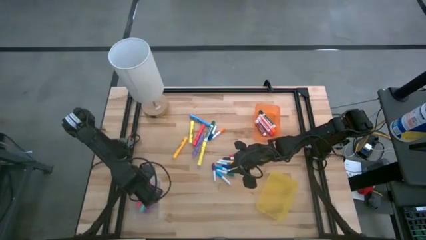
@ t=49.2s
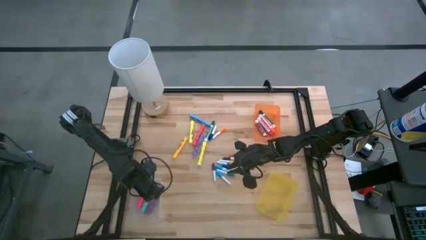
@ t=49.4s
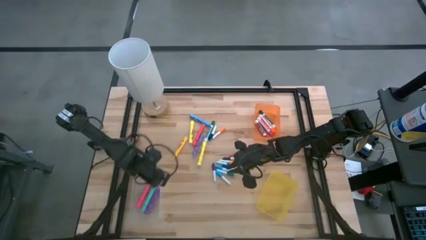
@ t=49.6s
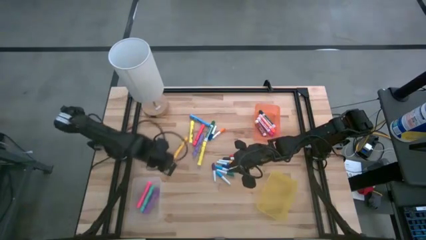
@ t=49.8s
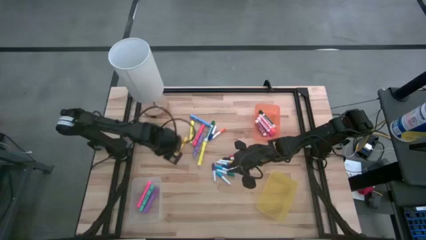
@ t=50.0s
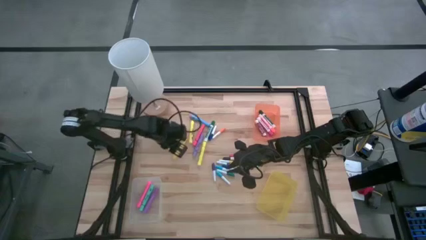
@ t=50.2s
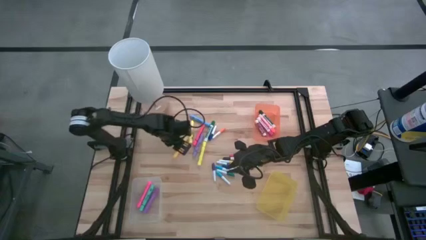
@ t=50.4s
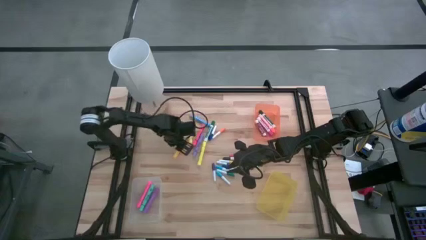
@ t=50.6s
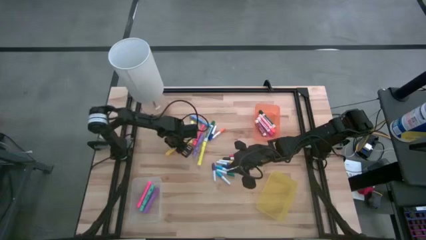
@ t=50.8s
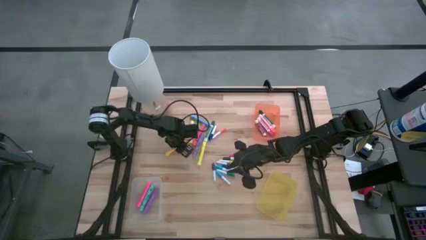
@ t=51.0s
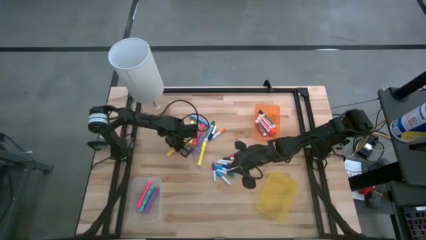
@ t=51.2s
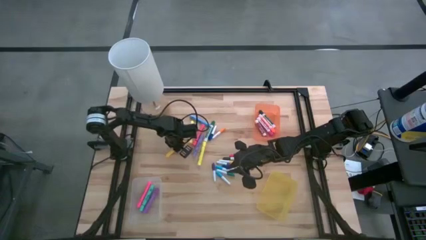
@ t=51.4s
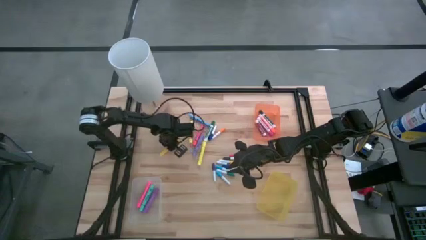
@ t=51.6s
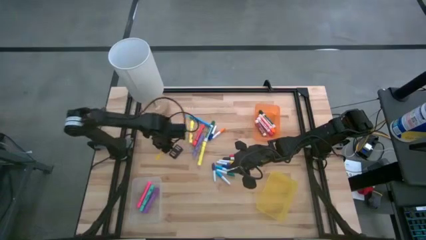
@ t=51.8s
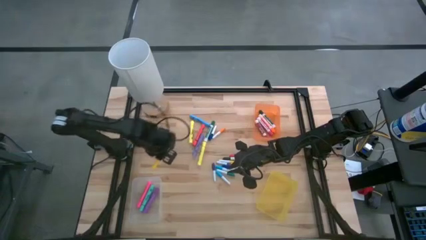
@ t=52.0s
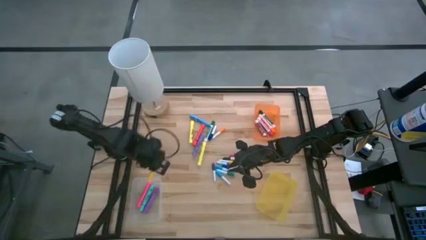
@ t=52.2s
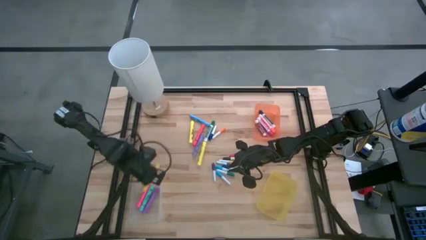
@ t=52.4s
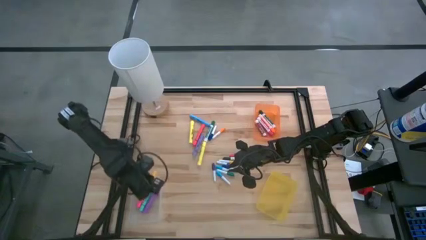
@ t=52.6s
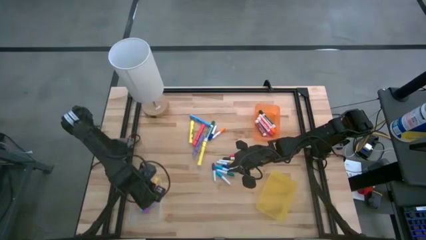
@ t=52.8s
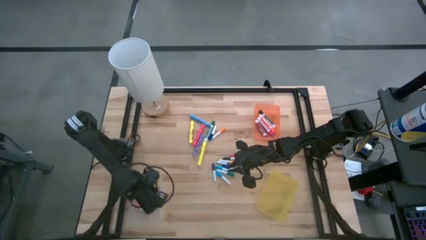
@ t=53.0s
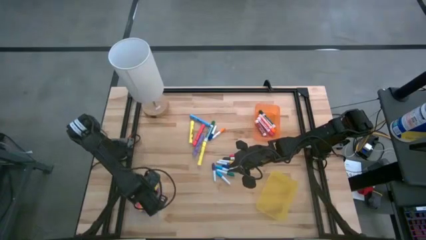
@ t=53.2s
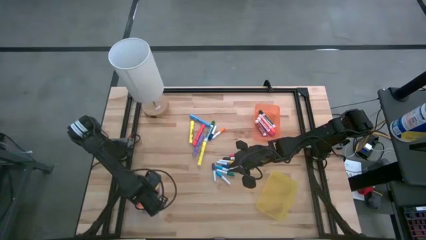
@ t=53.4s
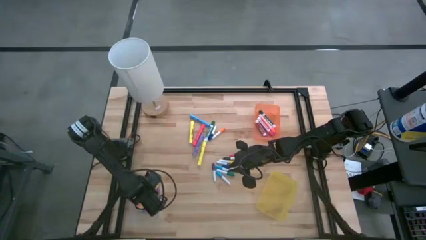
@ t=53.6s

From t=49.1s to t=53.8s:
Task: Pick & Place Markers
Put the yellow marker pen into the transparent bin

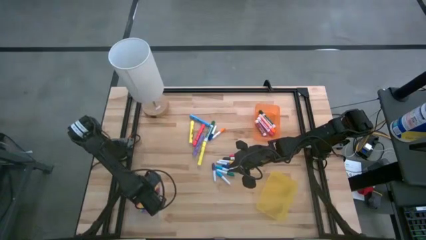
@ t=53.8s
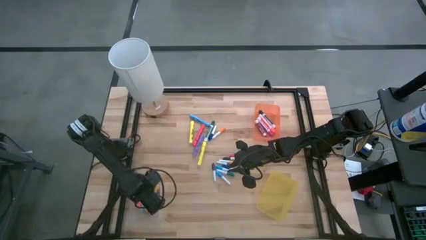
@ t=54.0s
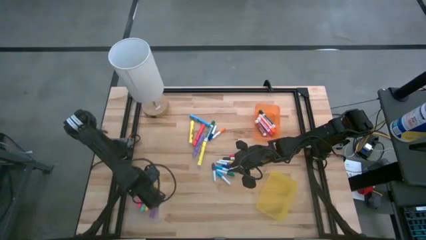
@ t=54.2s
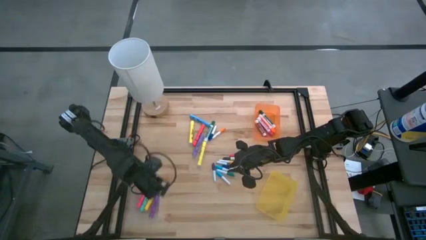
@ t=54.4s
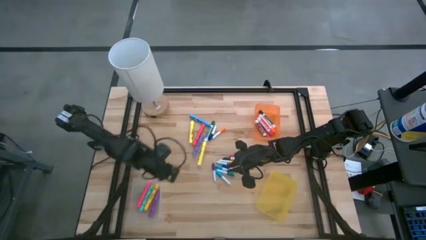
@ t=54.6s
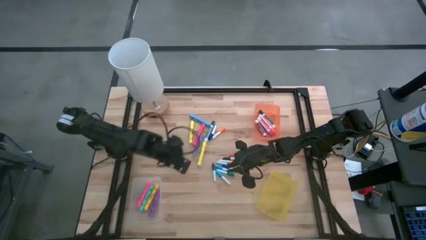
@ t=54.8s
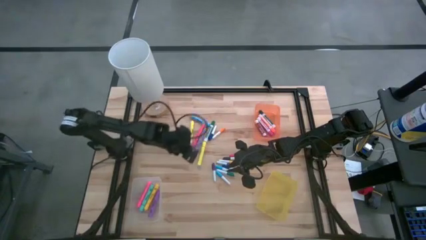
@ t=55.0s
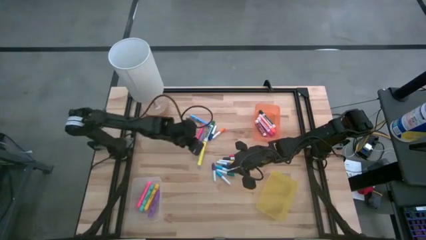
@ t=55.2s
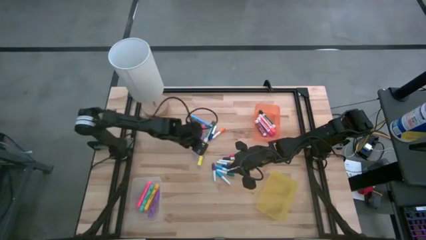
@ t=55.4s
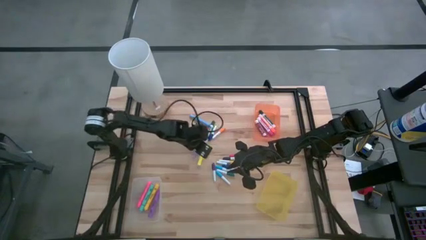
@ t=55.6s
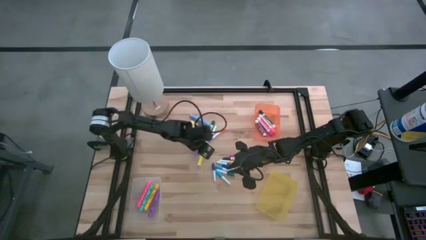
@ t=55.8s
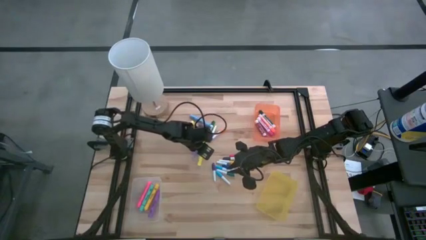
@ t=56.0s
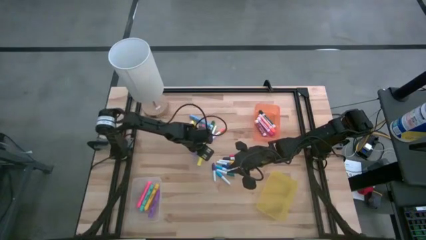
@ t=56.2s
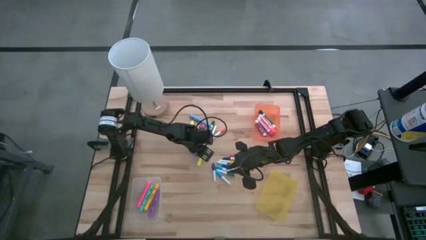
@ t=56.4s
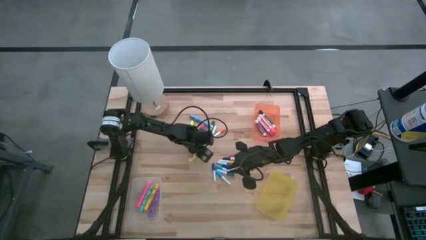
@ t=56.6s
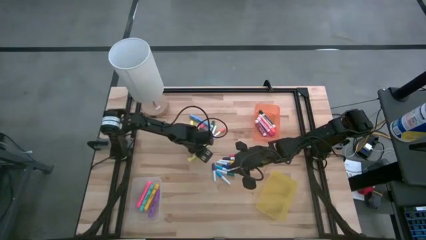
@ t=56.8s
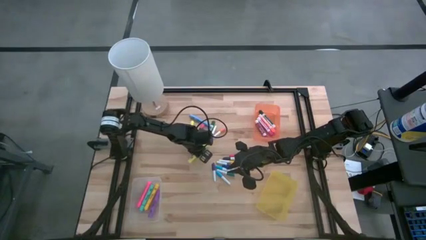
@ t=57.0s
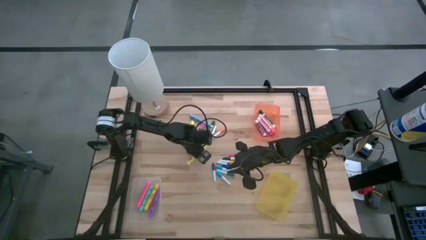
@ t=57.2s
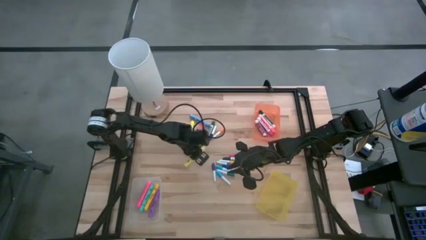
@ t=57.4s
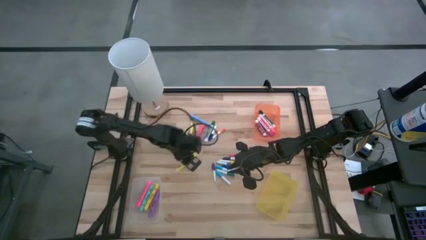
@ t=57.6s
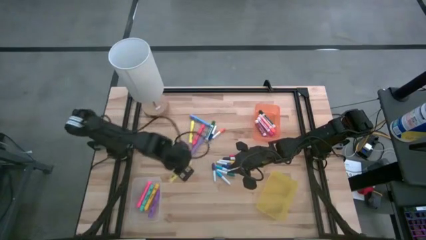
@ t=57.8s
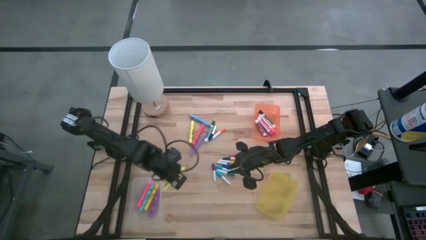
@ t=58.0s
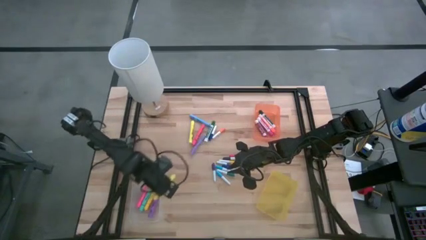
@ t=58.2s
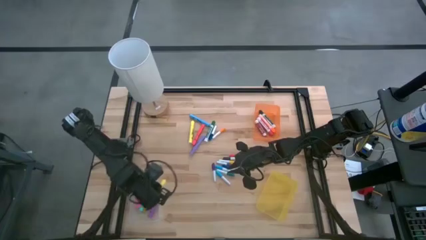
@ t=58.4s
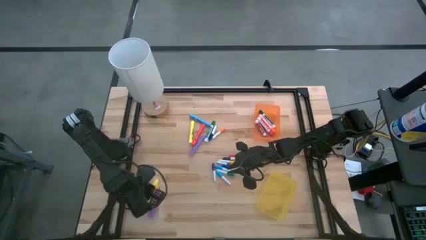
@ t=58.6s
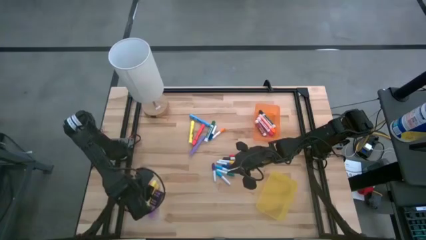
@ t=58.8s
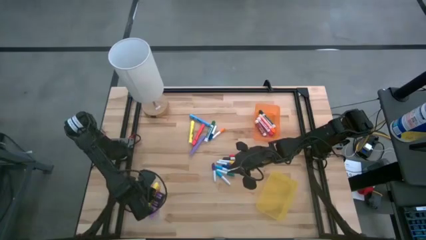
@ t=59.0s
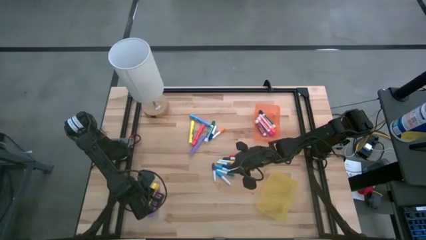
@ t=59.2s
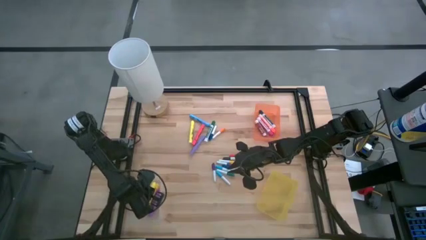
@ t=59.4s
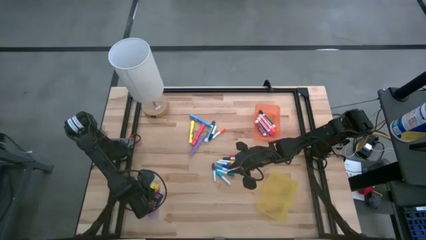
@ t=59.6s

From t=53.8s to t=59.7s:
Put the yellow marker pen into the transparent bin

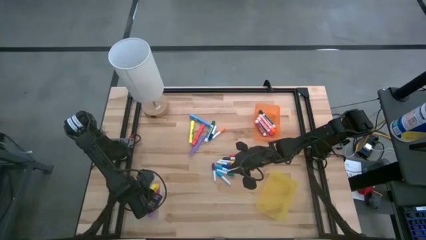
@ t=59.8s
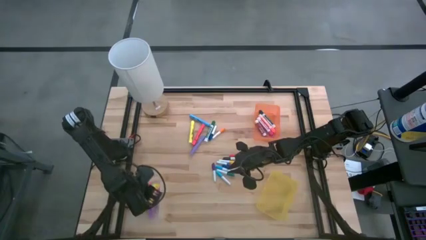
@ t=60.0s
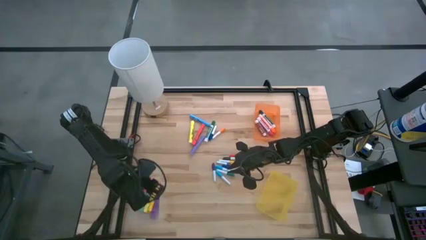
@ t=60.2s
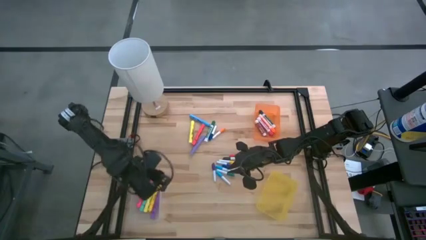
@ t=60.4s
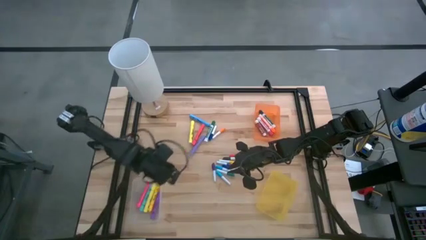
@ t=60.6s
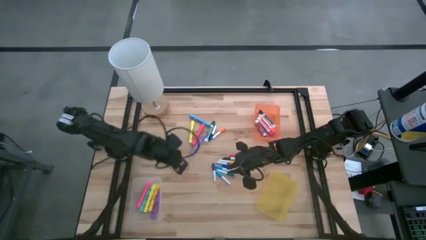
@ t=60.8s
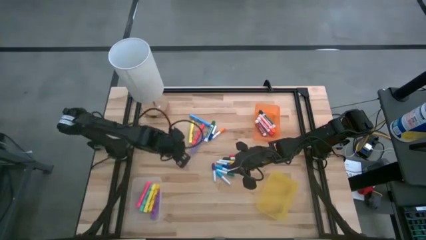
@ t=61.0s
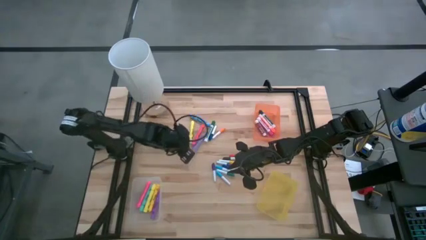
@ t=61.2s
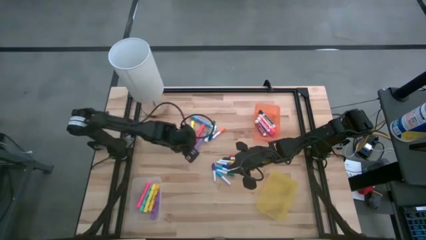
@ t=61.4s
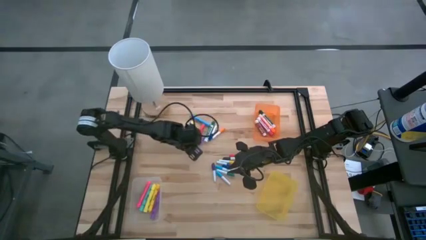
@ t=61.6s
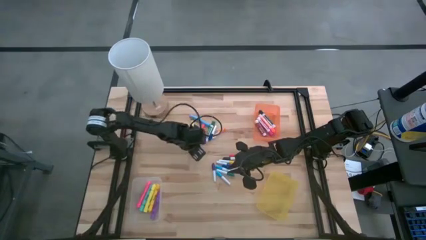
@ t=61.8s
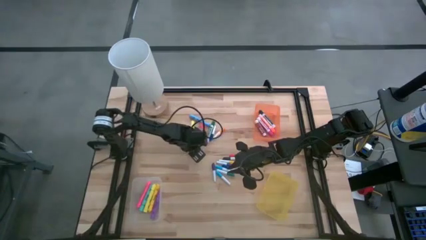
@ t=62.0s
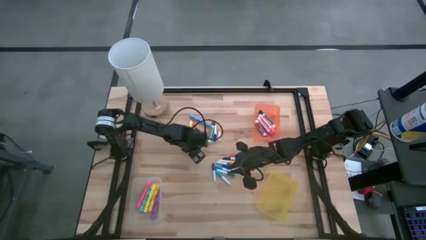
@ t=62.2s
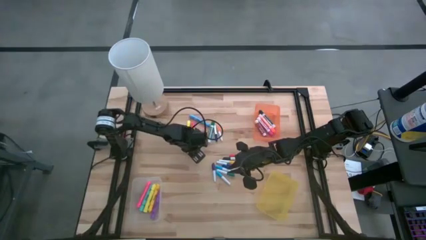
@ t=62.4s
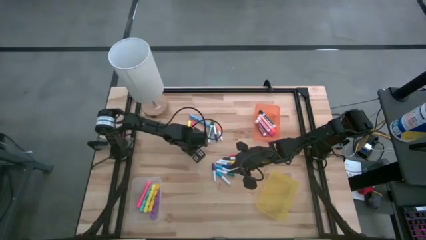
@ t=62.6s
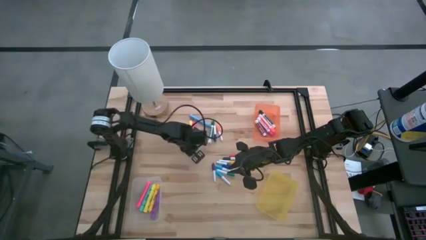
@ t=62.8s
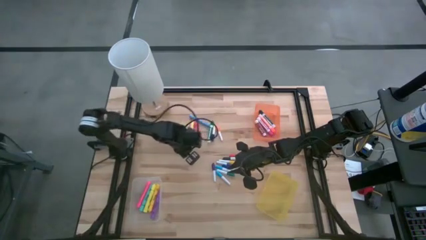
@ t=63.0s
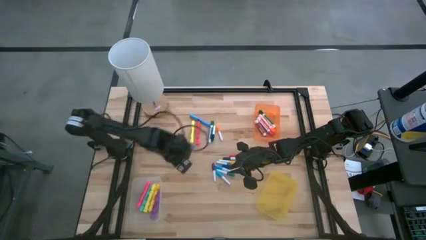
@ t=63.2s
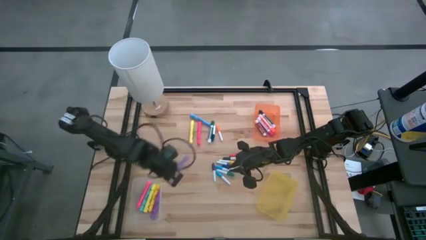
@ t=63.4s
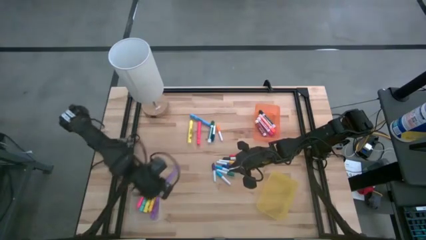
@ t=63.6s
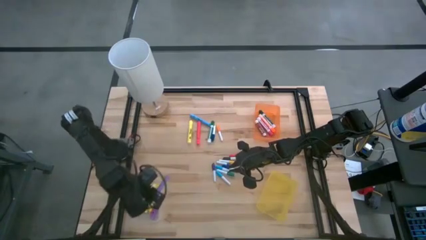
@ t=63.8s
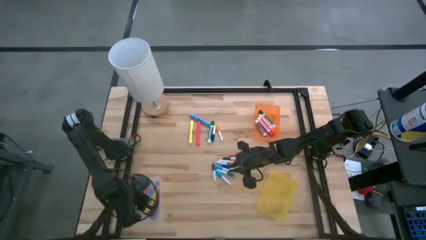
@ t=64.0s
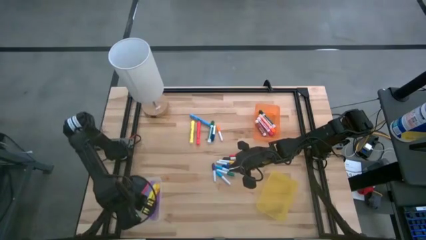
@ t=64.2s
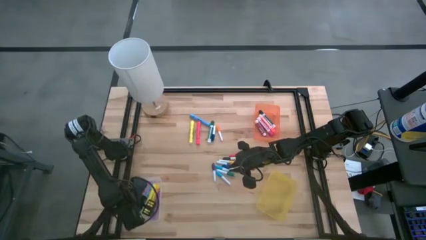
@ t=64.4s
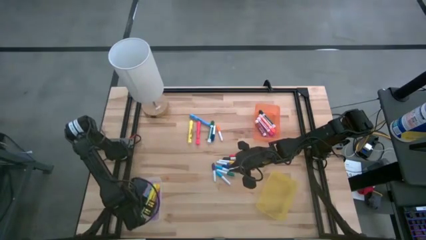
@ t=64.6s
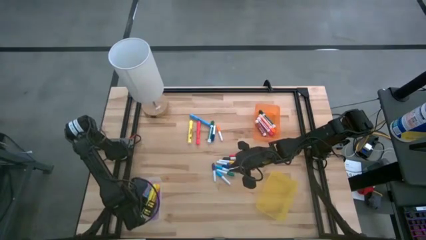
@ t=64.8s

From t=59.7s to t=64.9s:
Put the purple marker pen into the transparent bin
